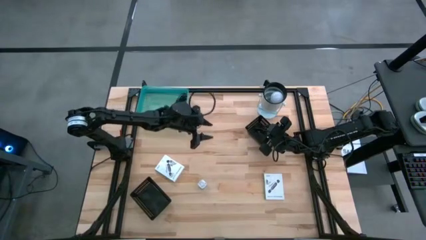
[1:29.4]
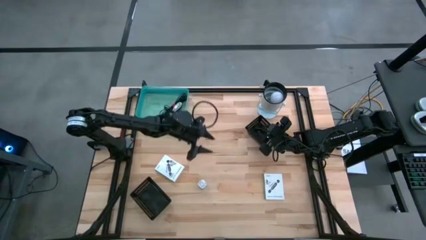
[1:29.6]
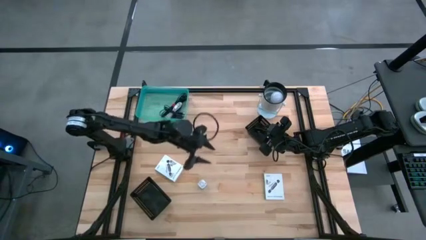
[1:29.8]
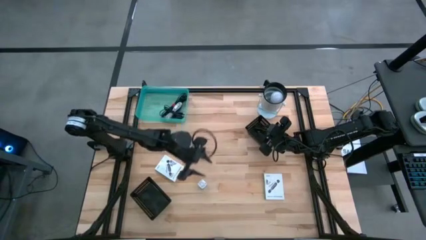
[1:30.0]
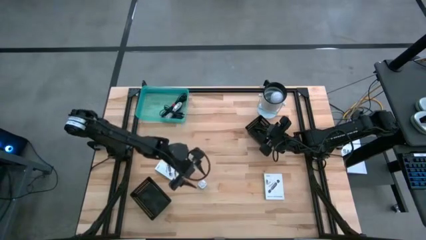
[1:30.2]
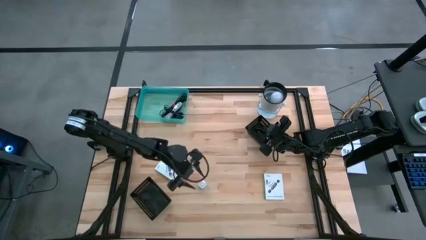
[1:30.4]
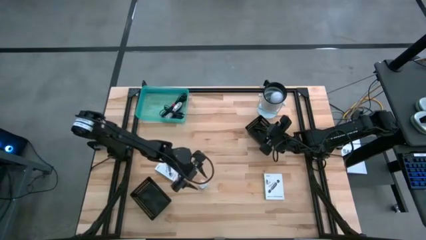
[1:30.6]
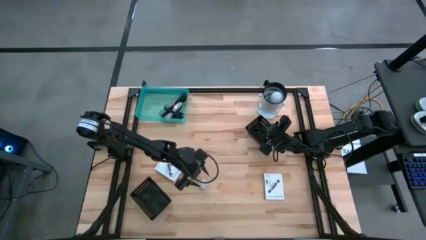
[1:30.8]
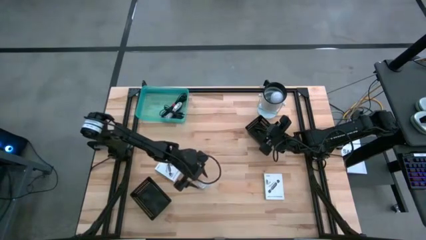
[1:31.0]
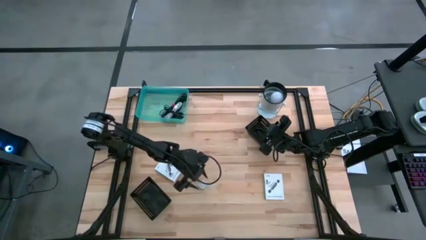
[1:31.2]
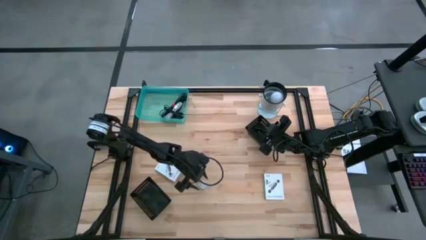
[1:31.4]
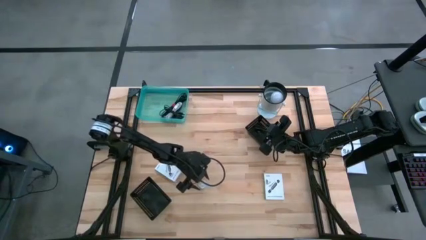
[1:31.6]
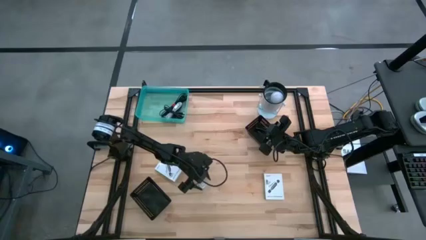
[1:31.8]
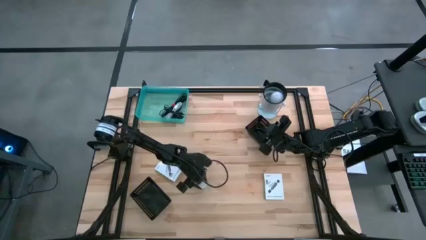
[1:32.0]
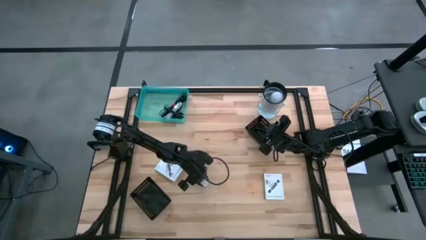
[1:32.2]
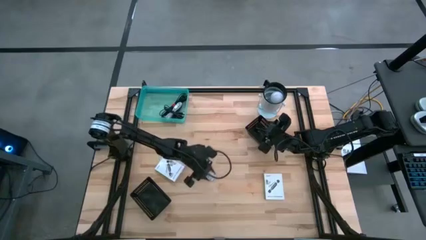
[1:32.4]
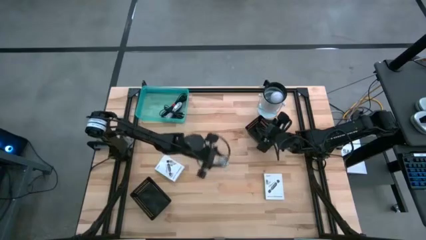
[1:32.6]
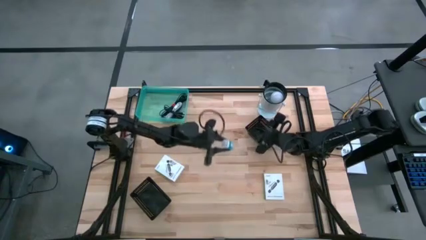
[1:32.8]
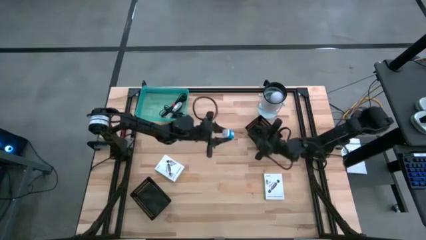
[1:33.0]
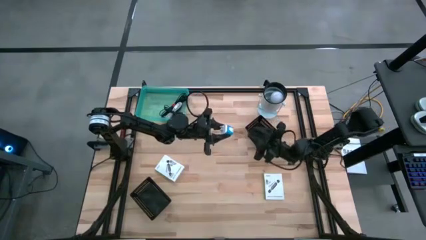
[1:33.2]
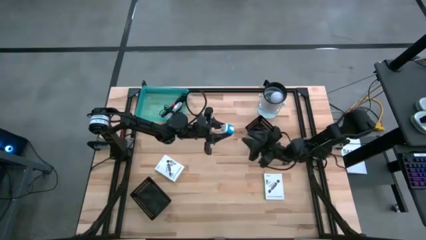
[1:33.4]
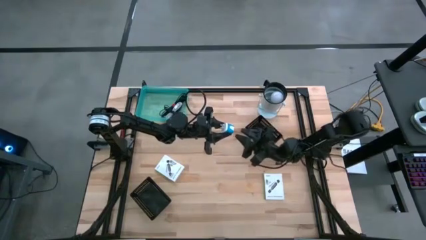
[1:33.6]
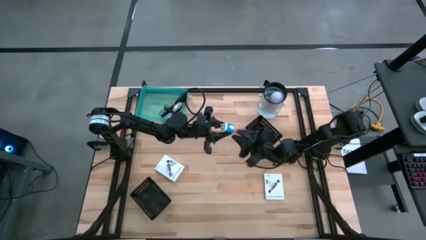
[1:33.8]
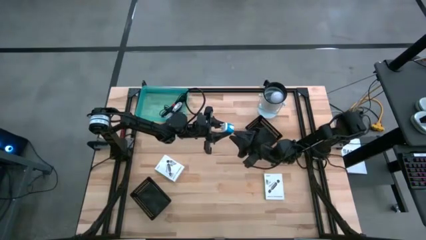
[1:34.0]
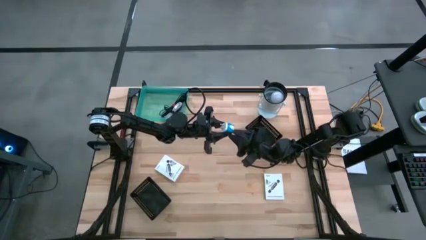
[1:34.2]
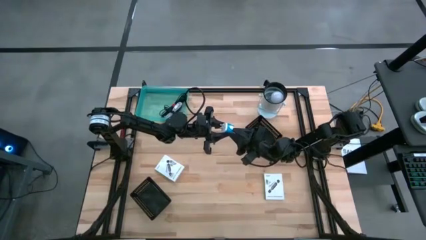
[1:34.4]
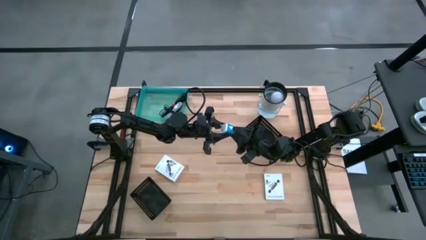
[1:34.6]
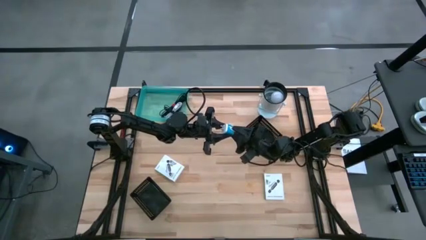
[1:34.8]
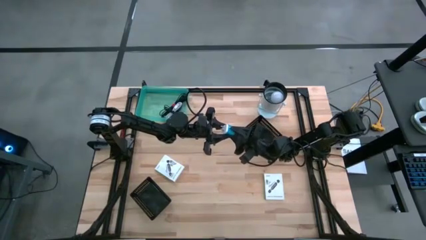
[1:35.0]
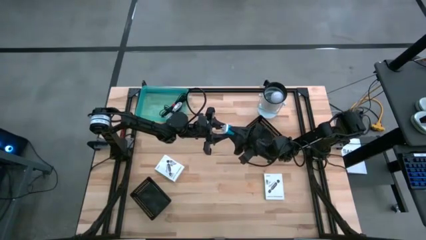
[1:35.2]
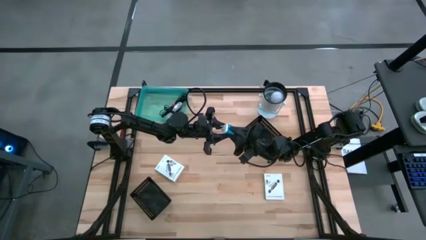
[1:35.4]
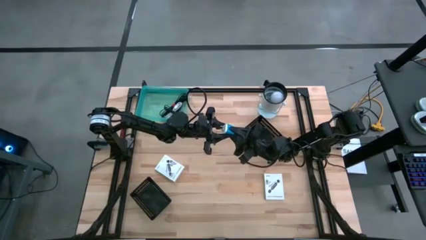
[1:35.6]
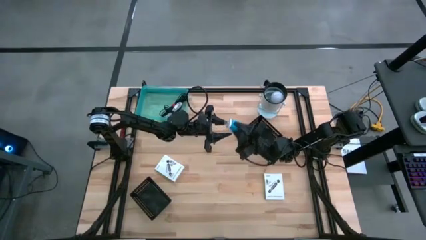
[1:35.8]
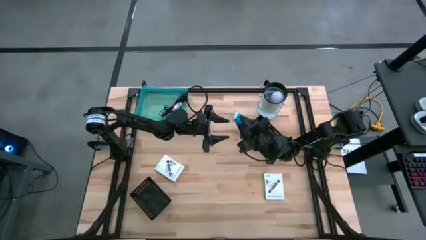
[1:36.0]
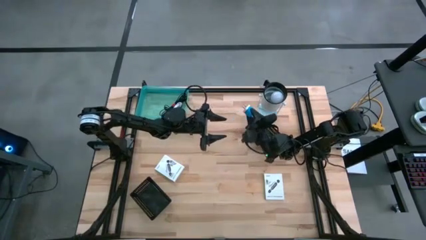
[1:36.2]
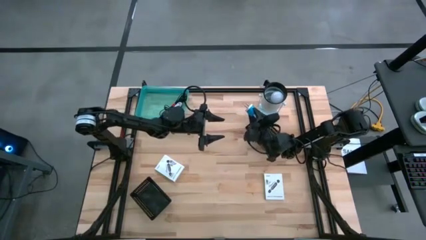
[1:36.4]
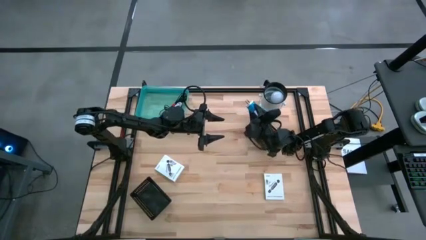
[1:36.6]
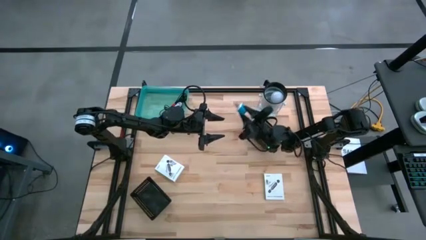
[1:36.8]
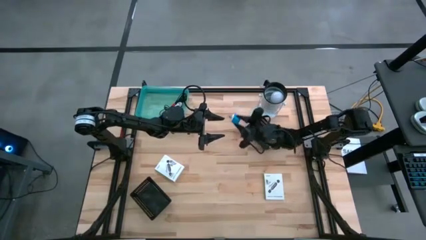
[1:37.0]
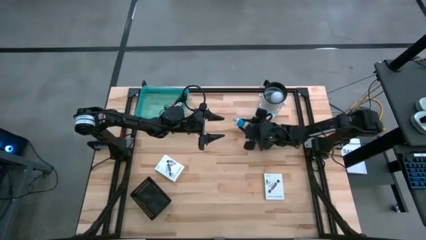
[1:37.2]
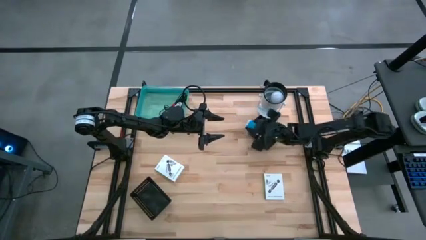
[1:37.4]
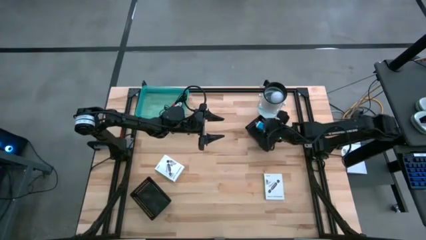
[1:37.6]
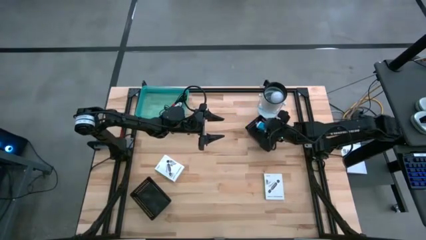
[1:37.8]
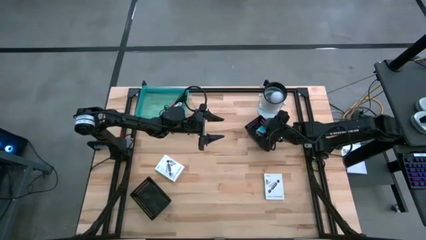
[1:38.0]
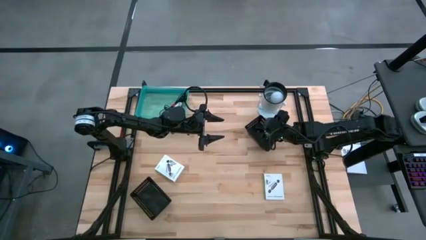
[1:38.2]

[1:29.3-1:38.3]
Task: Pick and place items into bin
Put the blue charger adapter into the top black bin
